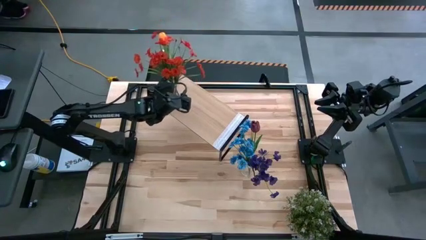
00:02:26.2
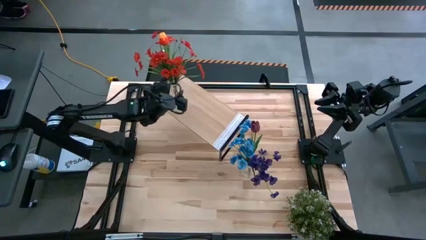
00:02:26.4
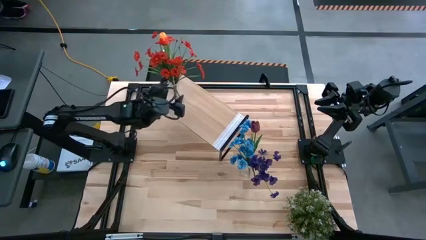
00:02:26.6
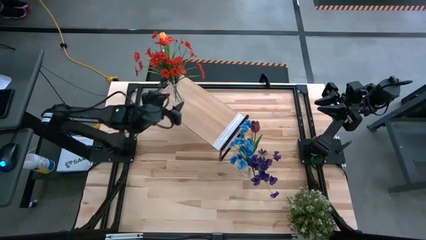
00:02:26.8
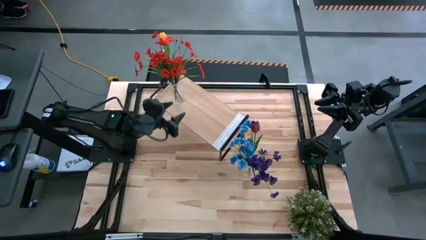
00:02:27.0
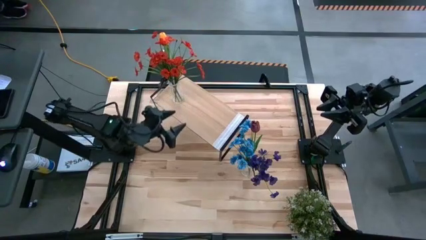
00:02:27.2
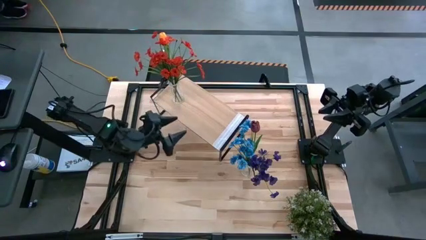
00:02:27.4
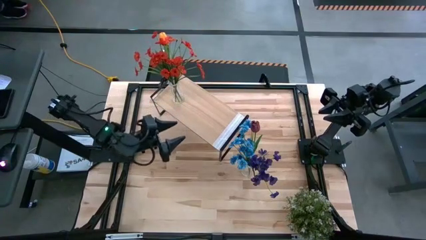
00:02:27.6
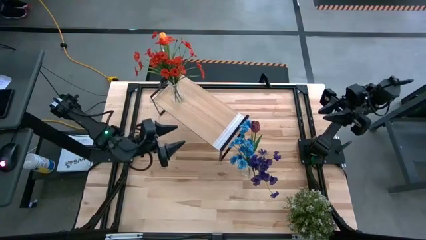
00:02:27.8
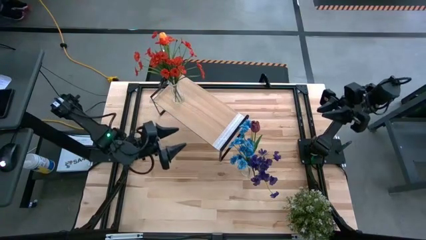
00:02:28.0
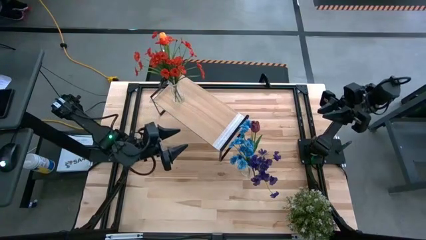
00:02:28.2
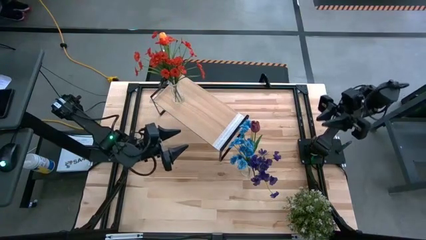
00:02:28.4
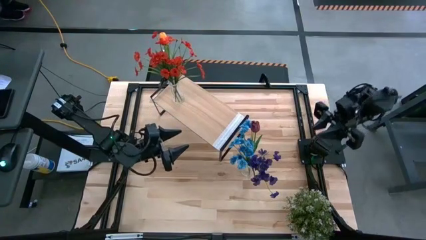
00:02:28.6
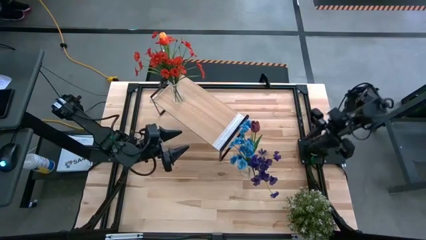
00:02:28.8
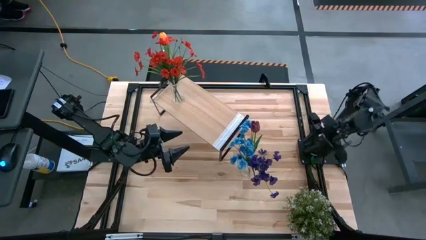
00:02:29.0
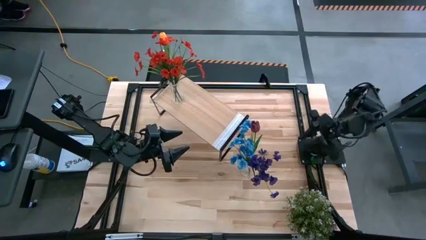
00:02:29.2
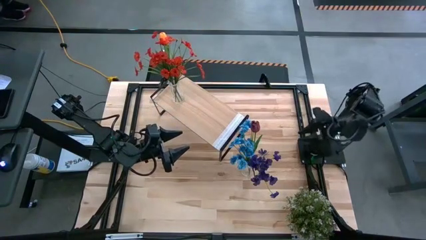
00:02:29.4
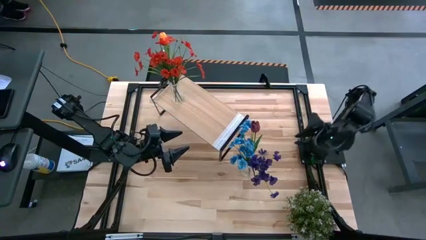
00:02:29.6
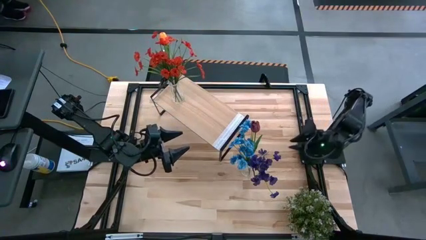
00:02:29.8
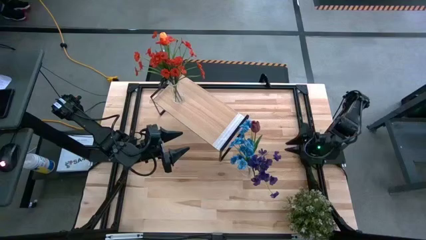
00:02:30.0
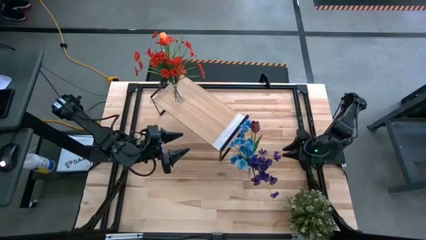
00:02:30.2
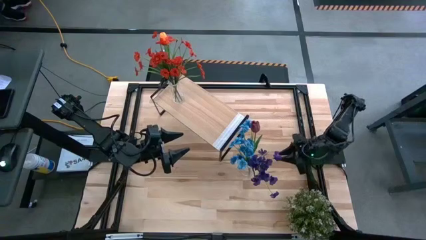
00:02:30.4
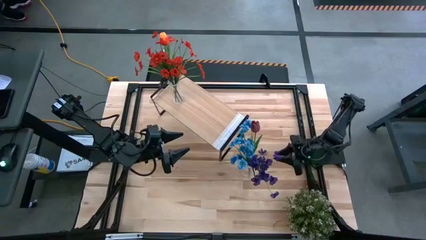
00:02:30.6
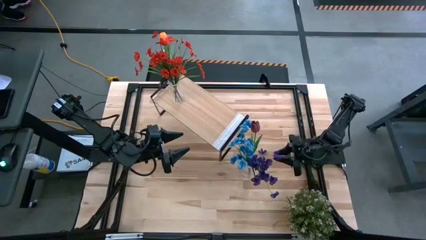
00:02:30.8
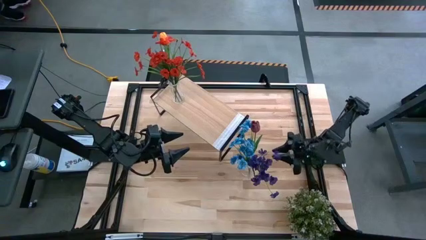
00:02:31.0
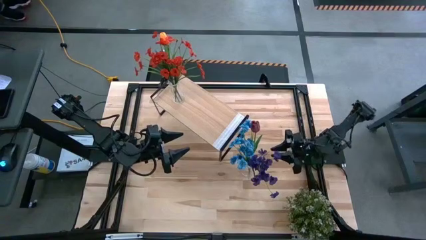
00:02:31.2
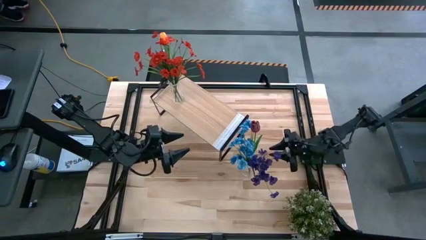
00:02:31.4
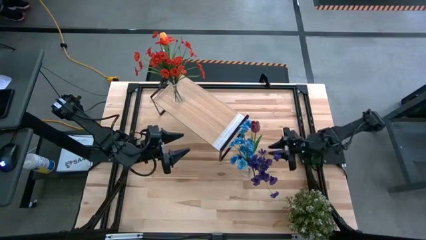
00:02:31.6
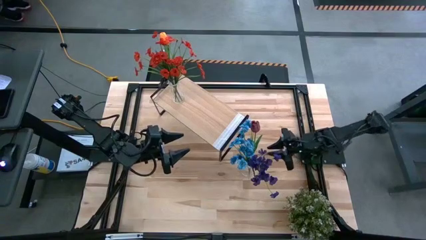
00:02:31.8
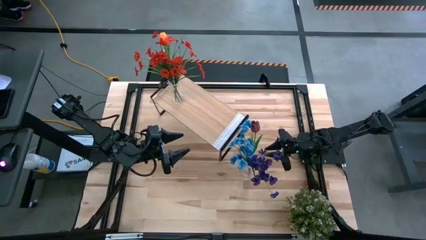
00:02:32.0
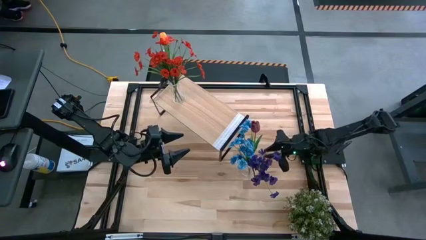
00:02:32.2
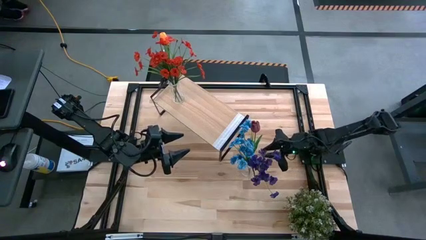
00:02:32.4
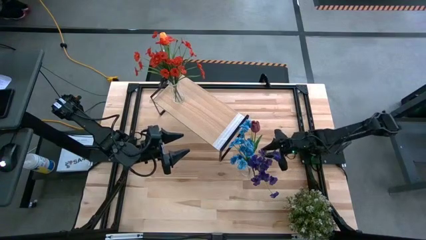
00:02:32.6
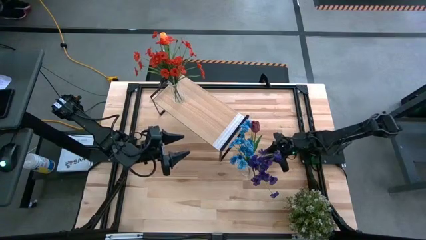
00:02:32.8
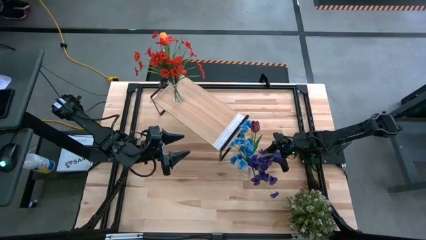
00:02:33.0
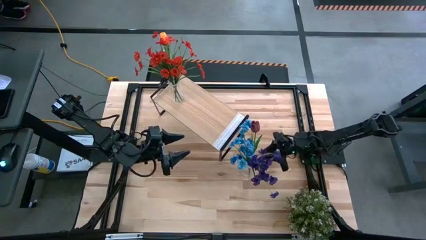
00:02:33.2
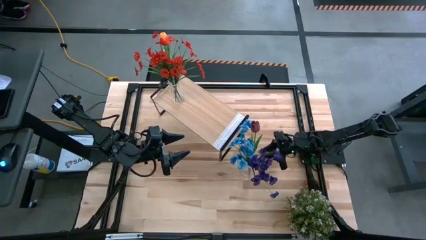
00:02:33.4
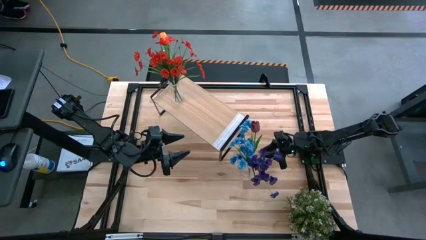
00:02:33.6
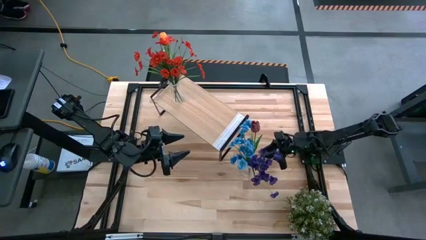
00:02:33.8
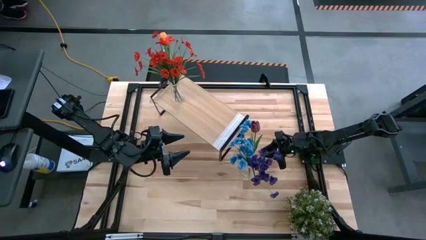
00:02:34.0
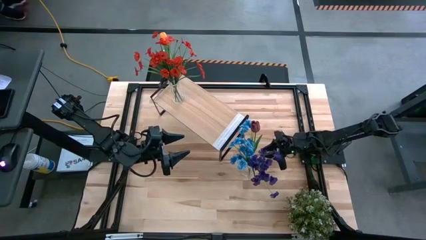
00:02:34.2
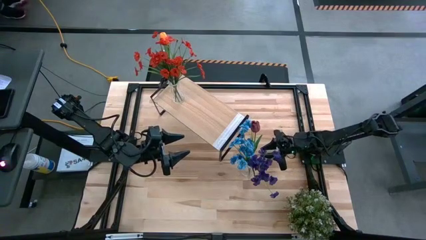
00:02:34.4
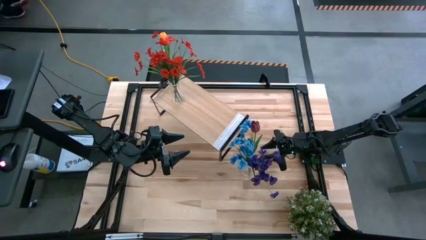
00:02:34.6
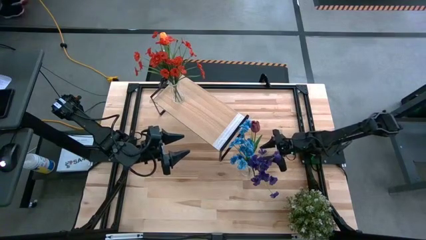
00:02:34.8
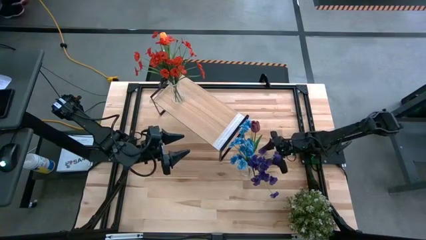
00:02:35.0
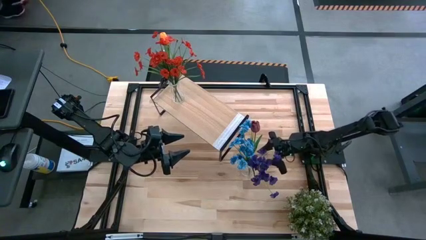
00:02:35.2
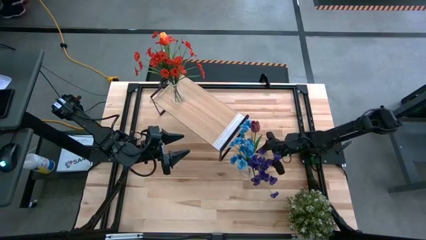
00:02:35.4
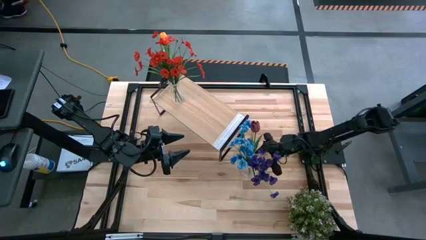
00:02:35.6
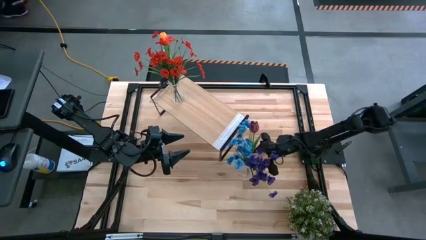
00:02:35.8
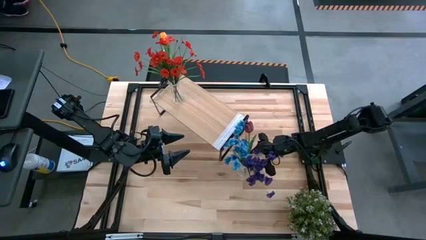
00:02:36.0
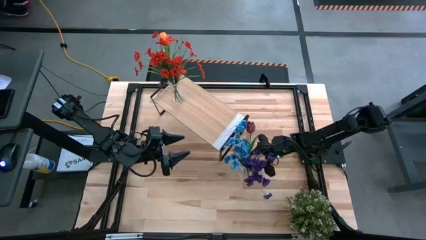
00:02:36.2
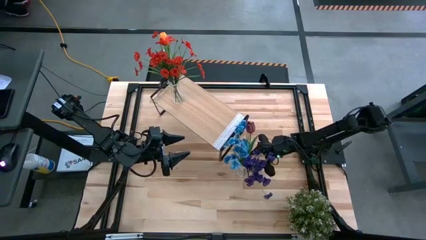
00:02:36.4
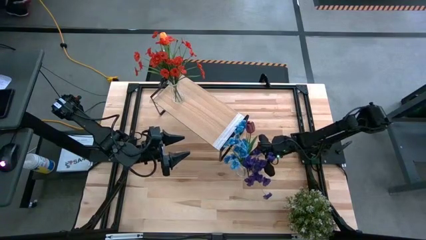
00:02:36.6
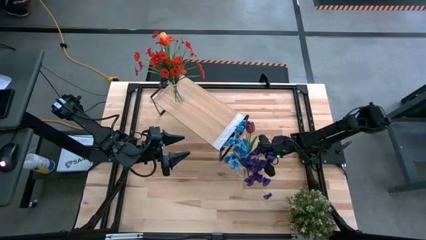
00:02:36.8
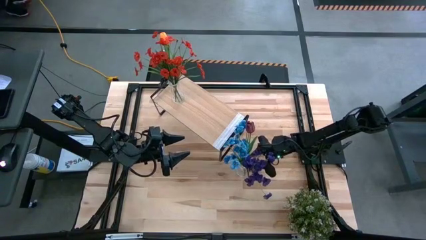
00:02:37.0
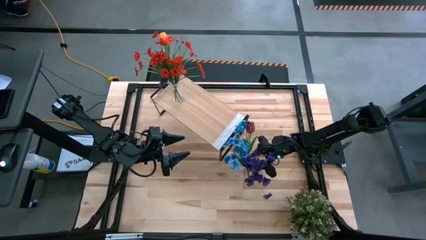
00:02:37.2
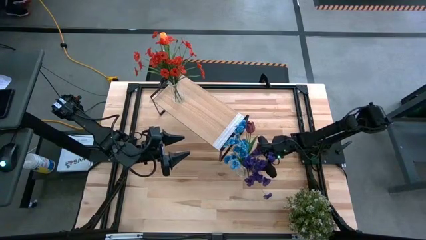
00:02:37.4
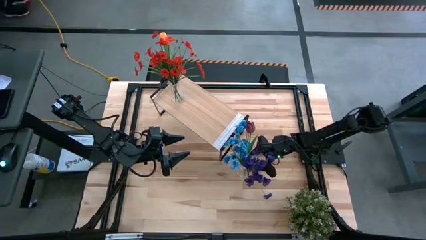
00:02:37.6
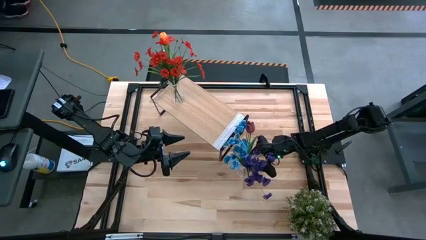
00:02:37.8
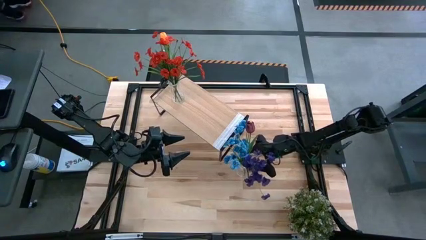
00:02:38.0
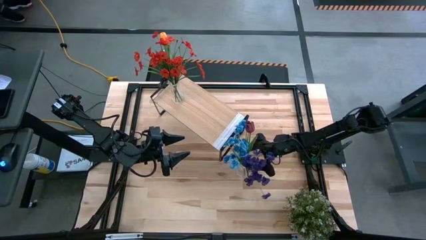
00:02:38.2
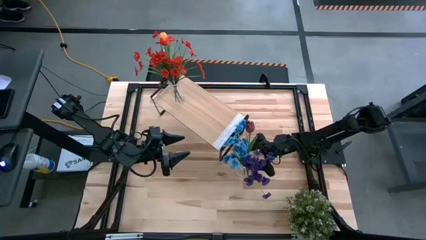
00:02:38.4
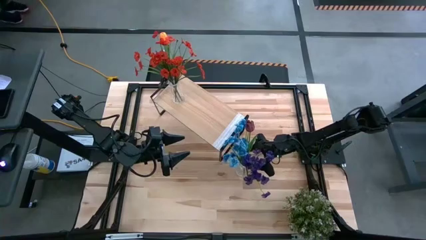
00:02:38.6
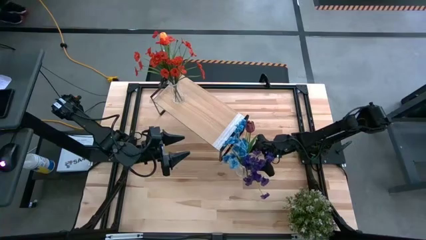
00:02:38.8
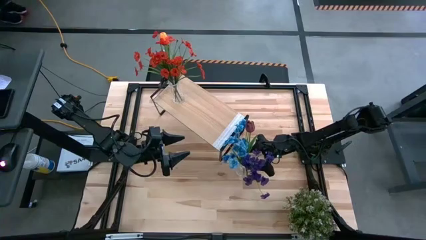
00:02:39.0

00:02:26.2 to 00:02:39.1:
Task: Pick and place flowers into a vace then onto a shelf
Put the transparent flower vase on the shelf

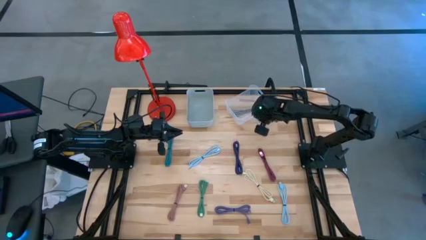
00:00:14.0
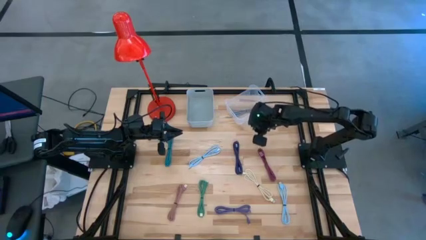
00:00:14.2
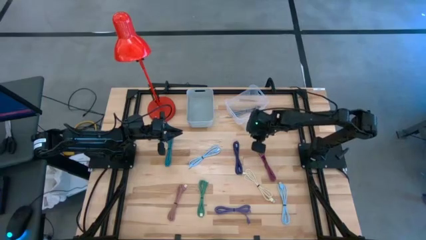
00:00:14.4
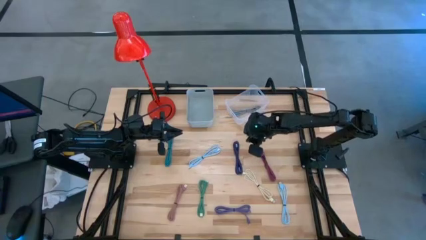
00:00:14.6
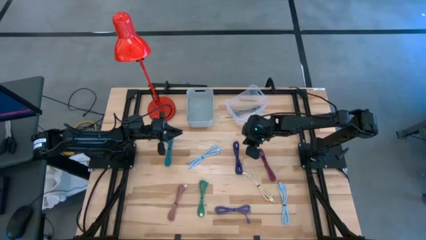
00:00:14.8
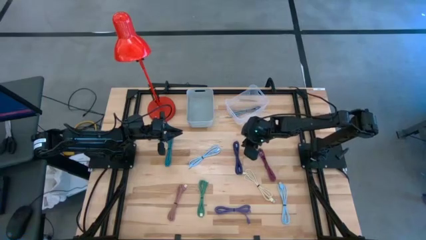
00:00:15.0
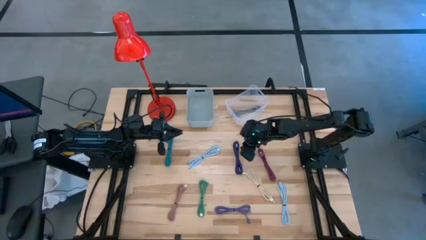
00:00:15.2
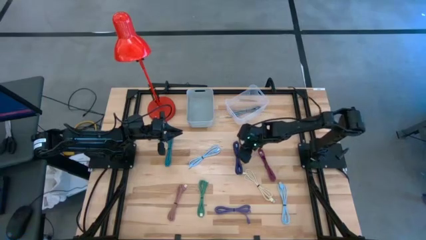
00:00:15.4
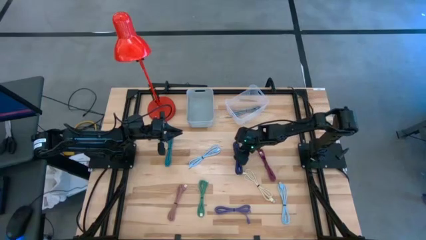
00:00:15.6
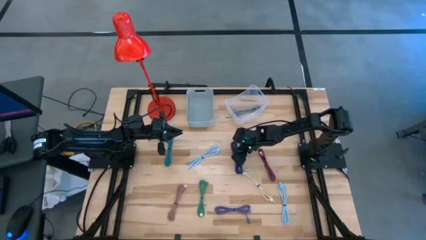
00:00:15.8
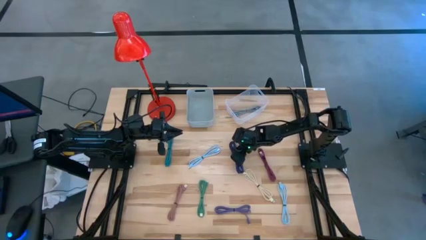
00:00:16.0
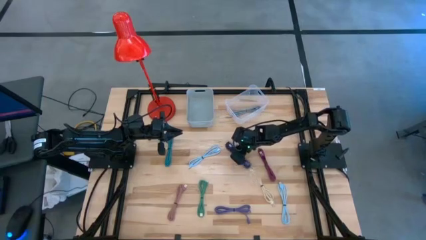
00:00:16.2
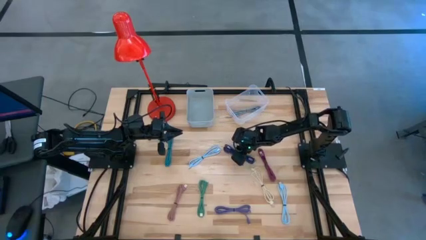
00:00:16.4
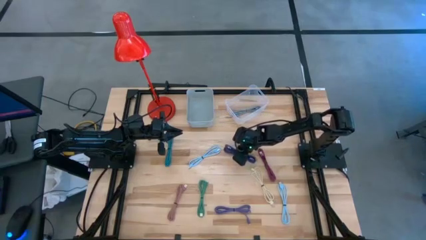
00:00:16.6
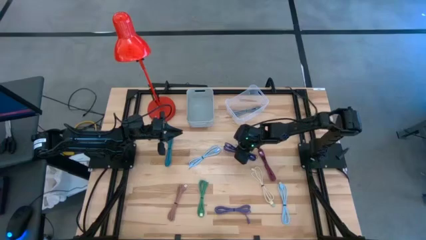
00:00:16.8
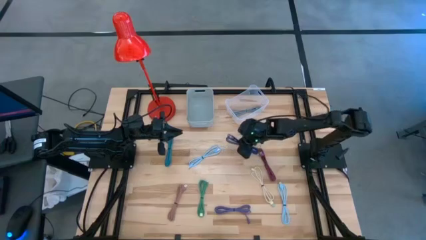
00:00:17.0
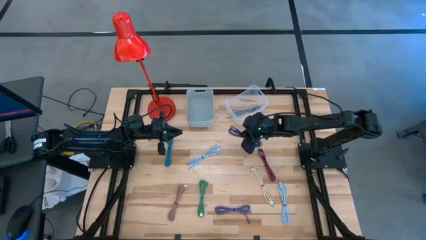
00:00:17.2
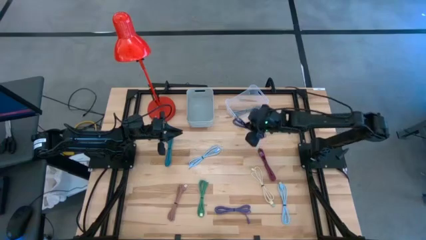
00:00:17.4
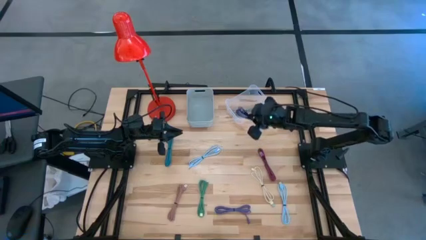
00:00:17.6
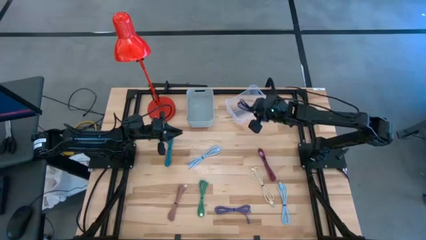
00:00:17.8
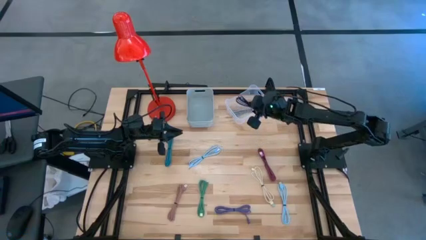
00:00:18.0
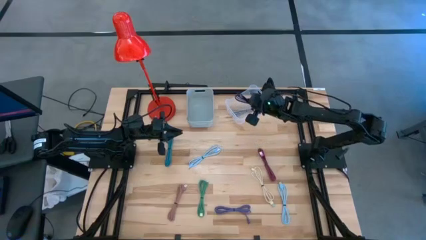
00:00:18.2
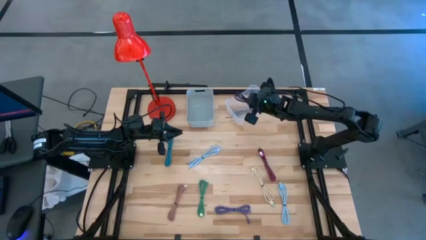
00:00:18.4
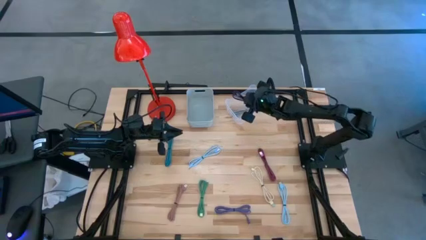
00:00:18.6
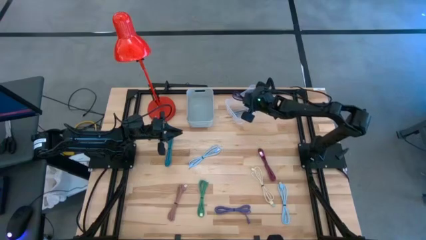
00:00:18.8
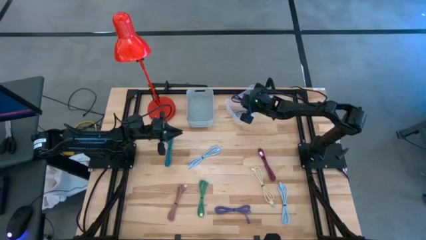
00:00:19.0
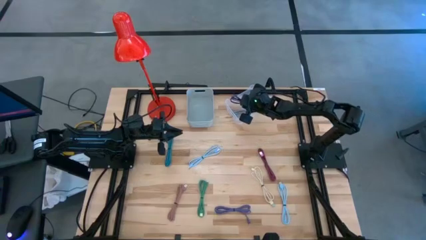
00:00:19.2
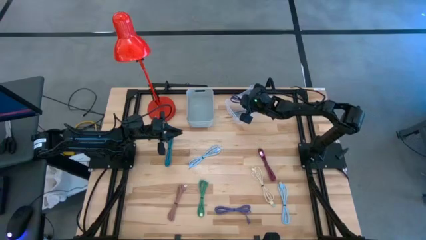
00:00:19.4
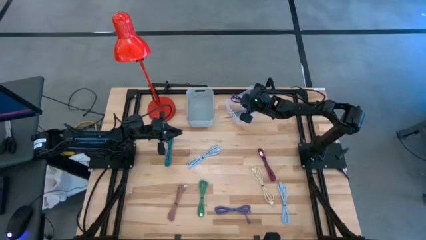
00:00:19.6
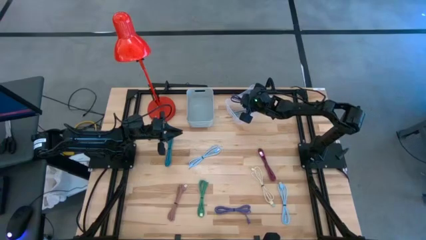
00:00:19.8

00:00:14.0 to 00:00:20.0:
Task: Pick & Place USB Port
Put the dark purple charger cable into the transparent bin
